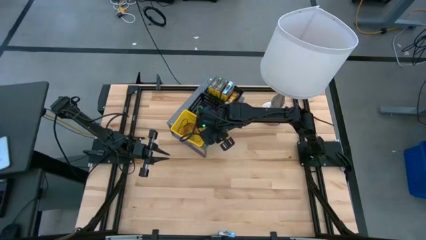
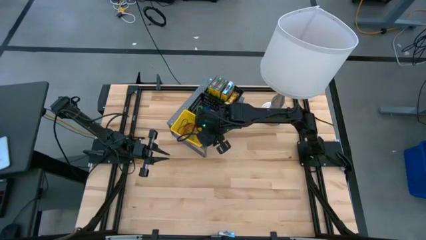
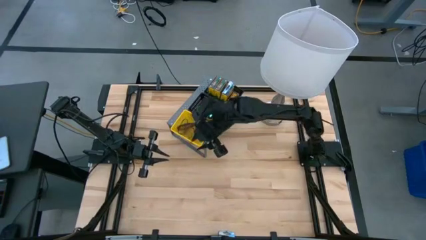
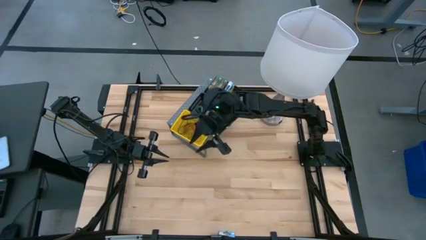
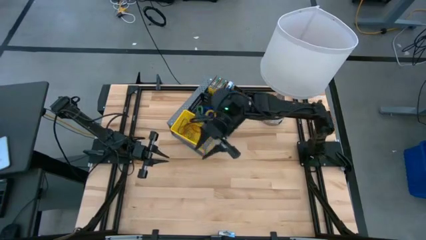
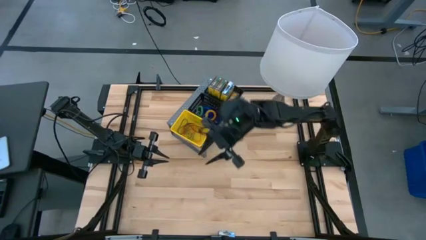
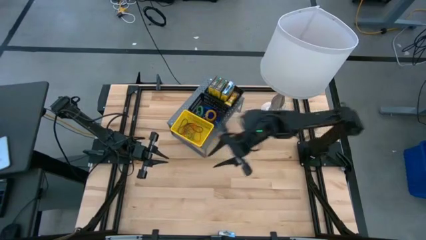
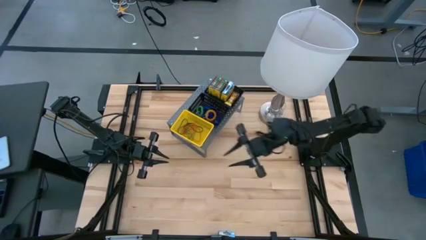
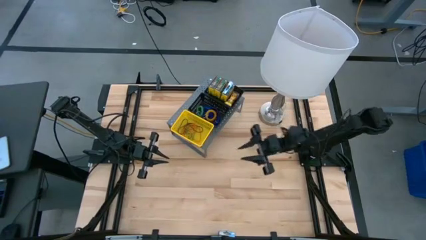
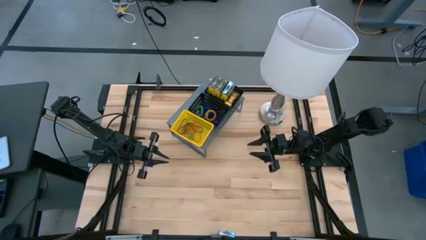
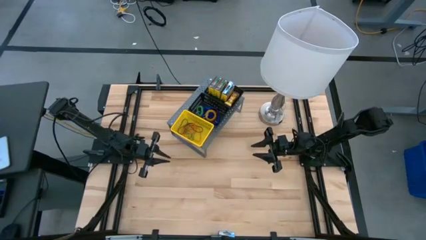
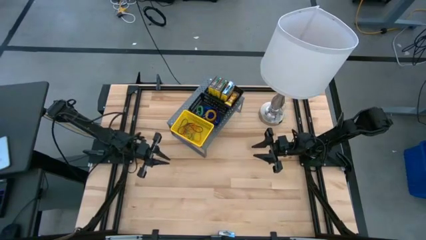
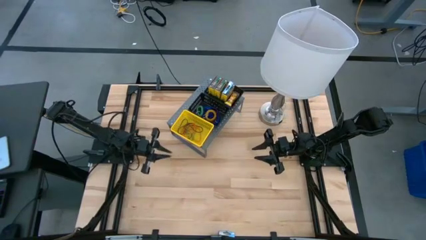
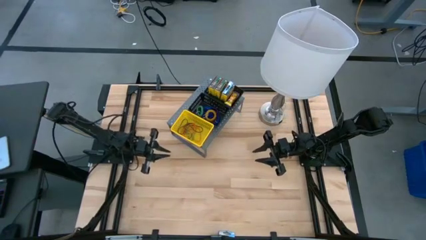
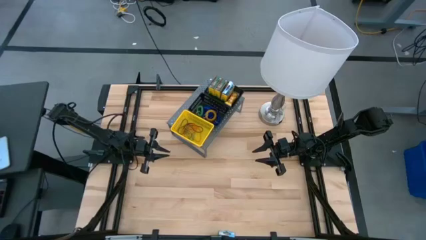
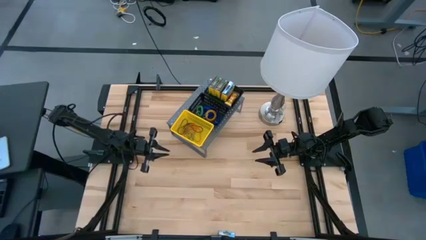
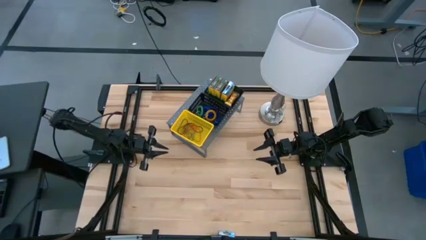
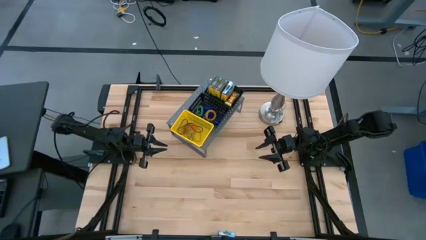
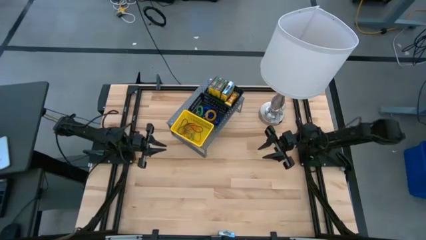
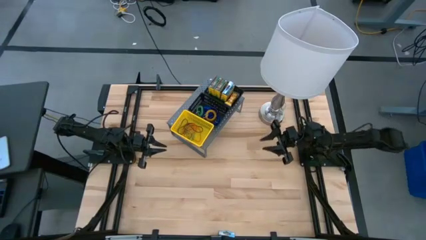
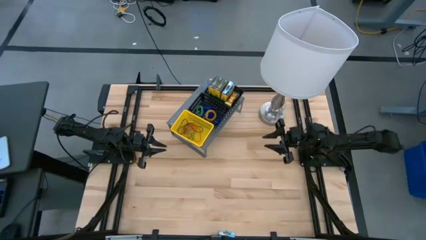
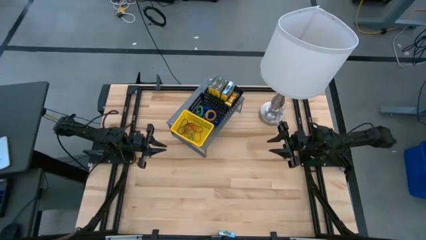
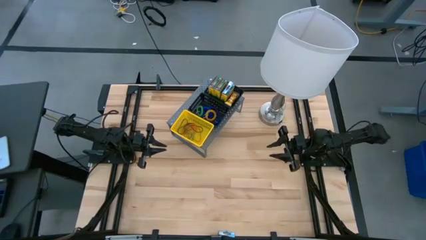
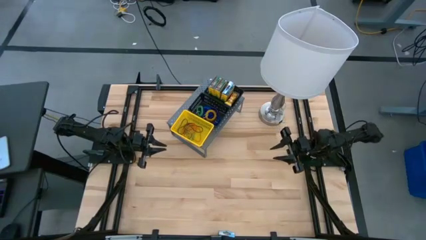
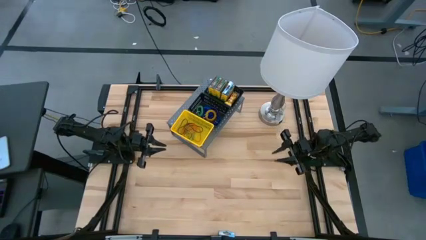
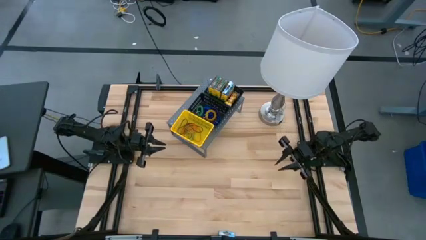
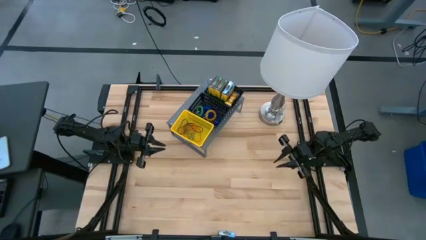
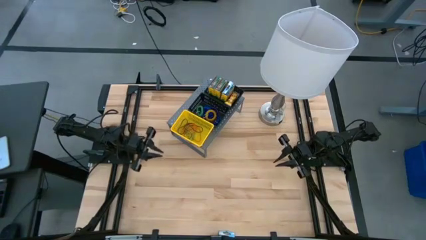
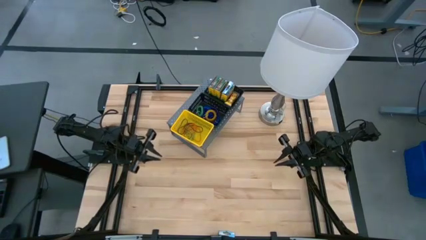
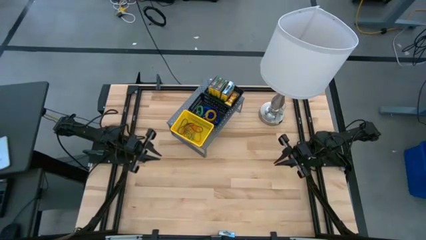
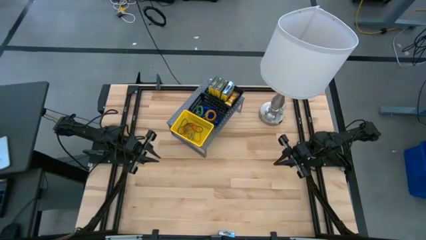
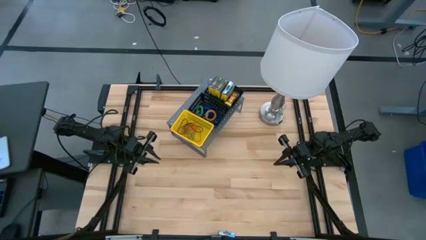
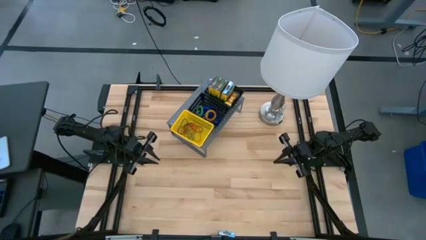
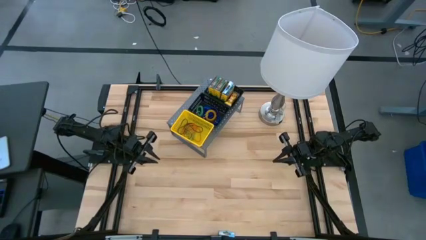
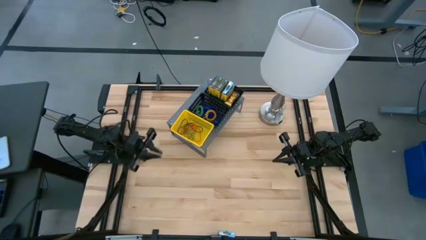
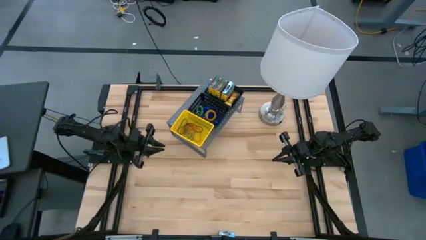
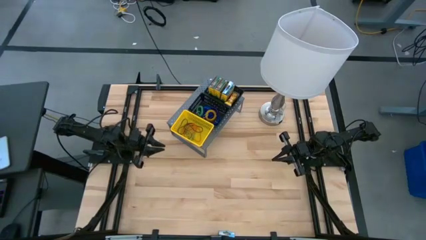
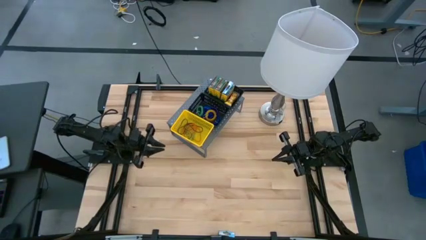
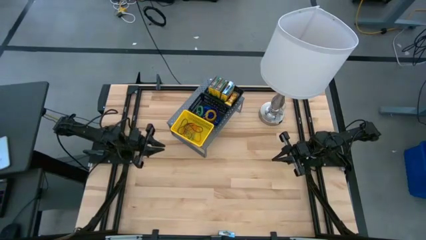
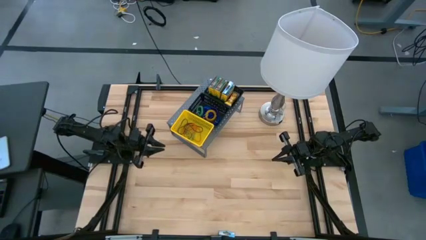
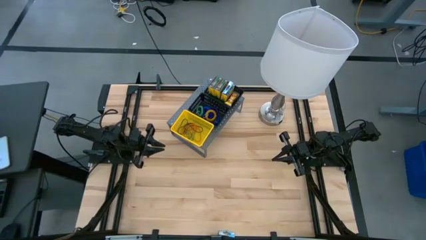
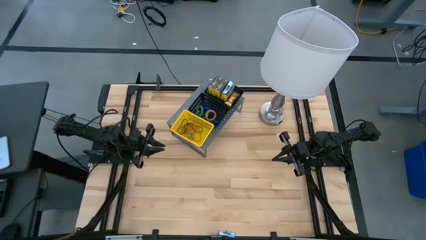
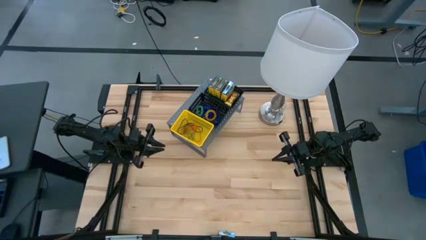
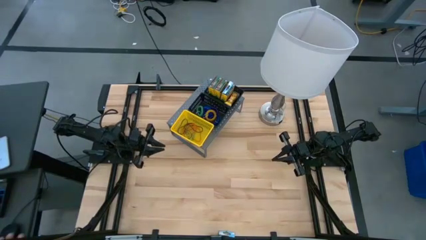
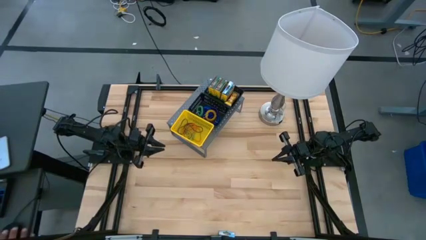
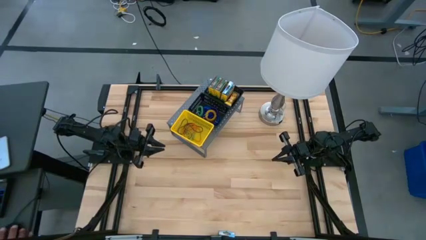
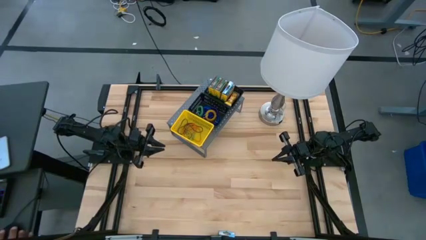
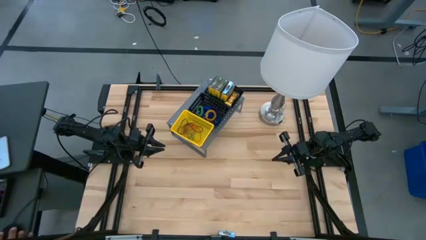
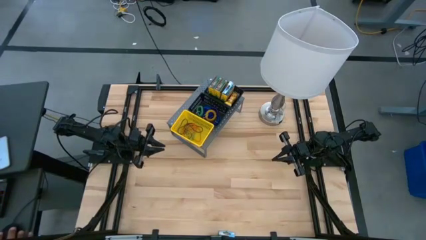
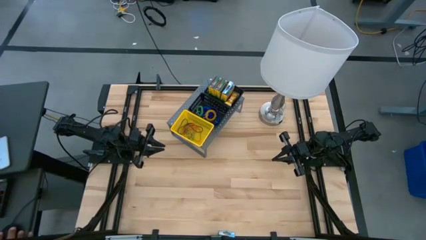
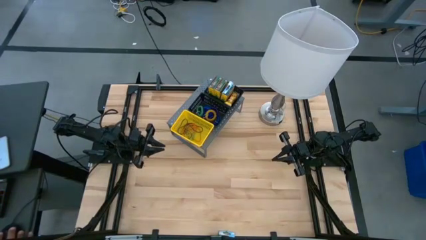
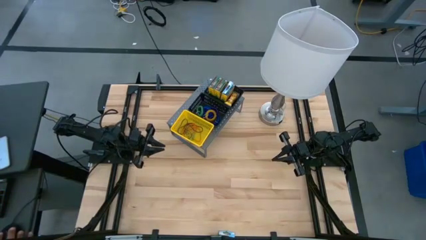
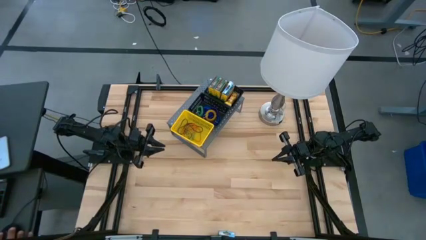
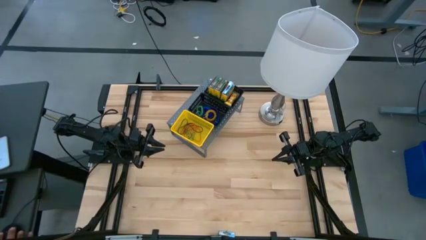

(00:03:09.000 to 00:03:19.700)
Task: Pick & Place Office Desk Supplies
Return to Home Position

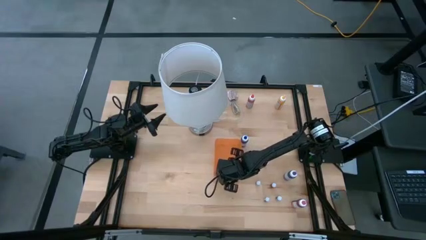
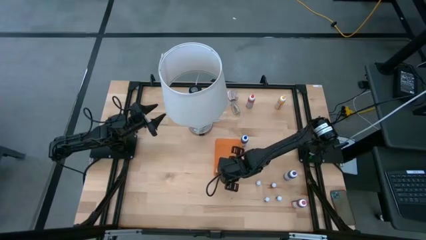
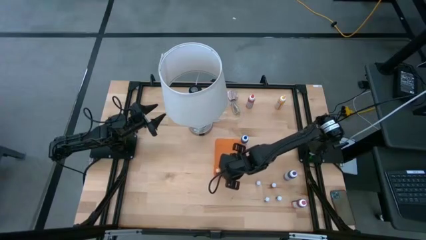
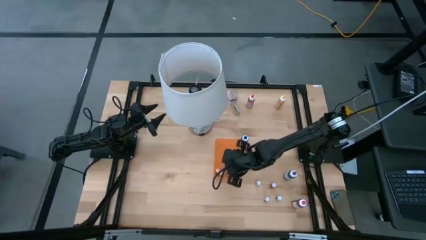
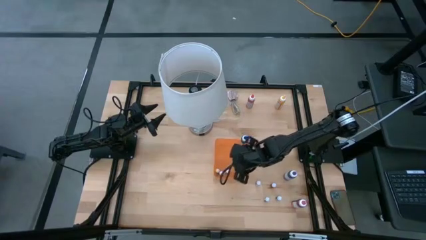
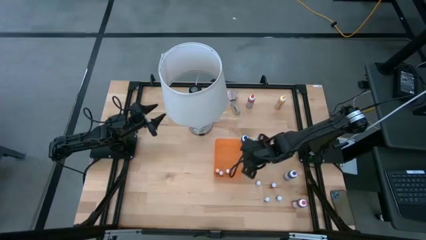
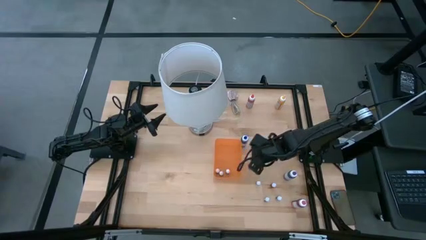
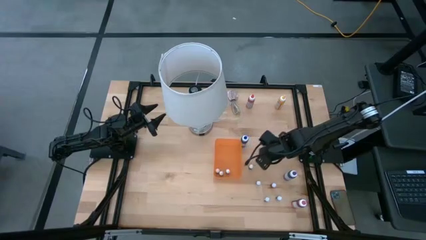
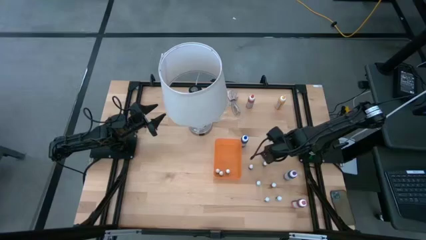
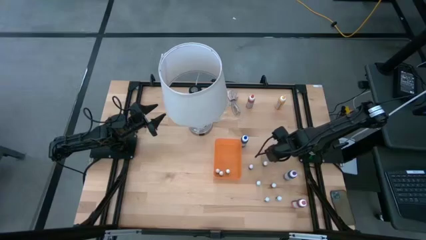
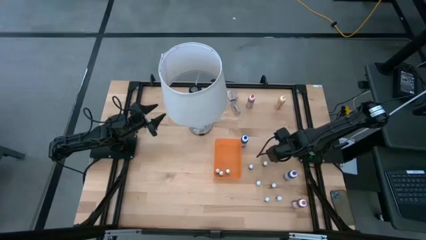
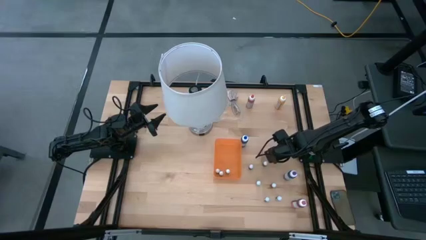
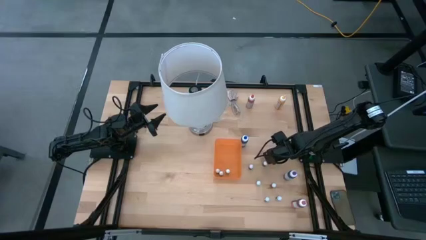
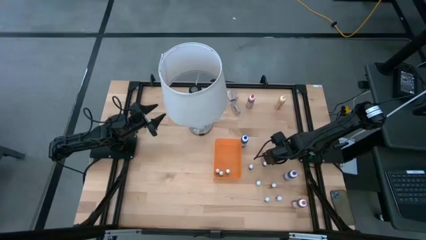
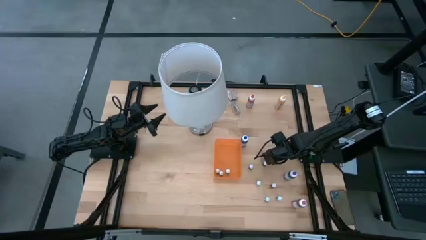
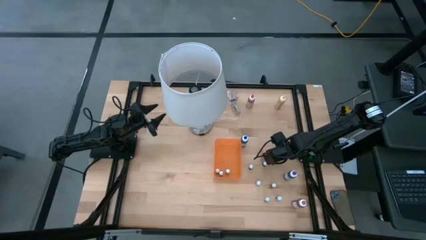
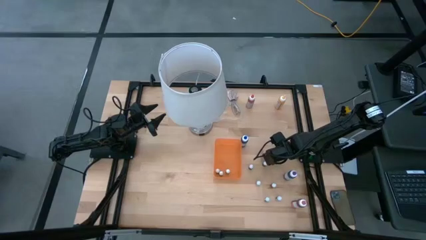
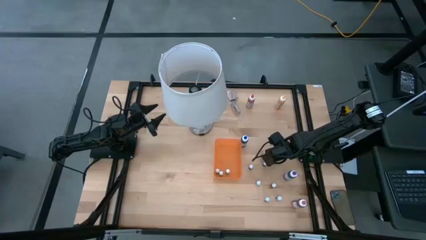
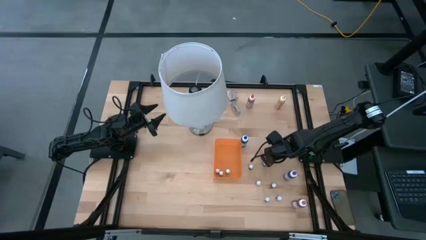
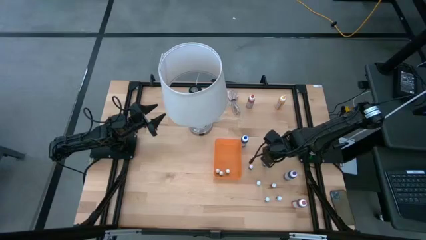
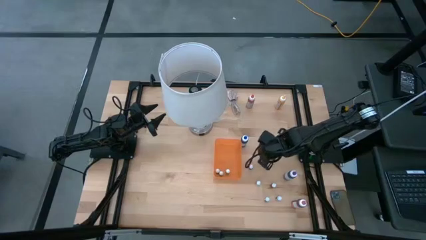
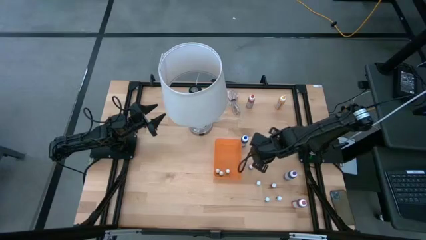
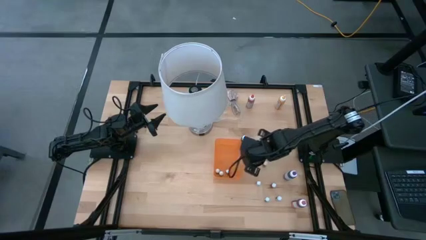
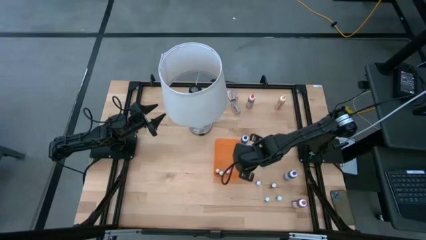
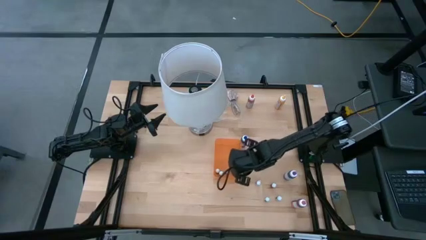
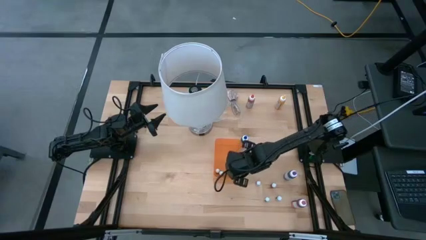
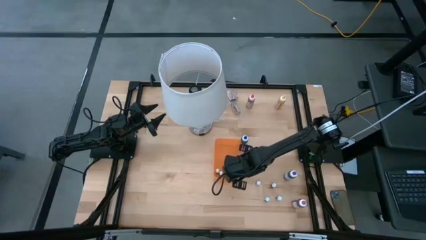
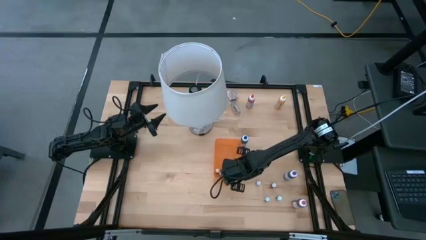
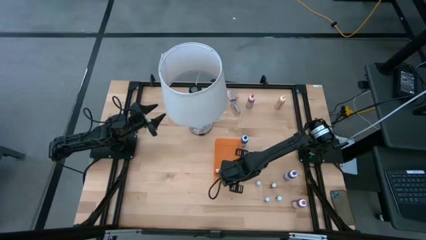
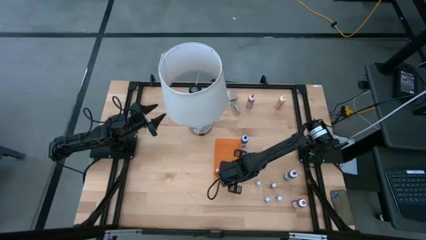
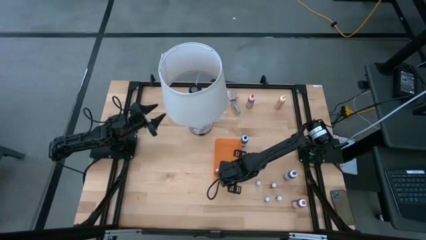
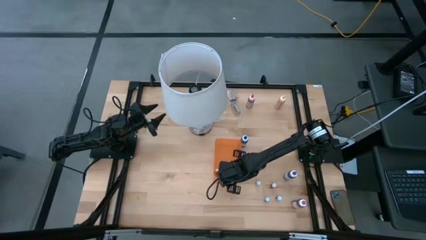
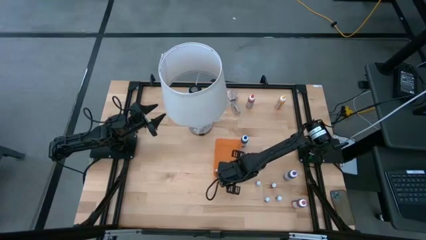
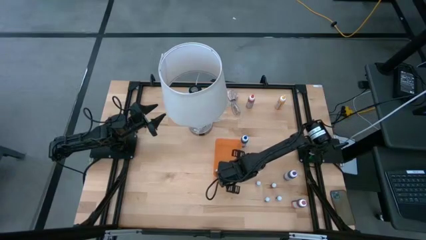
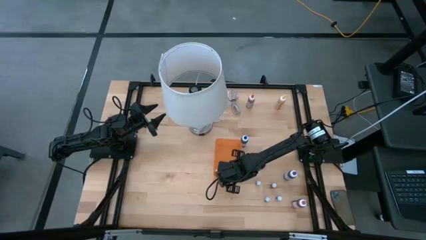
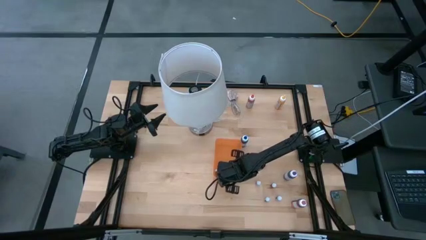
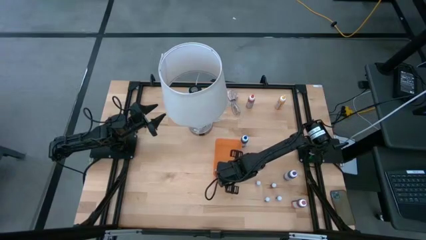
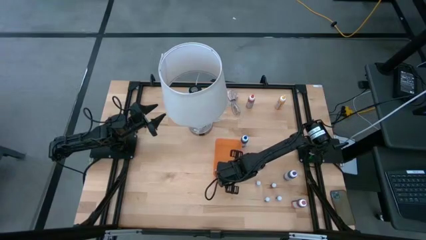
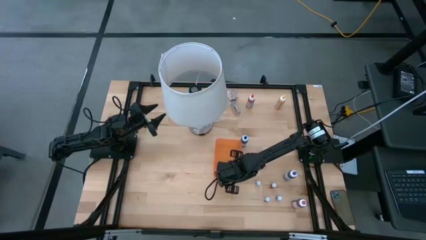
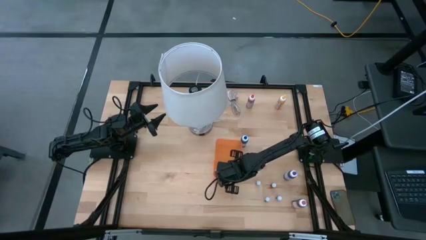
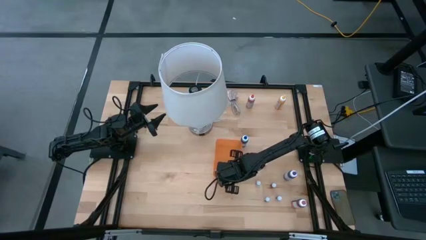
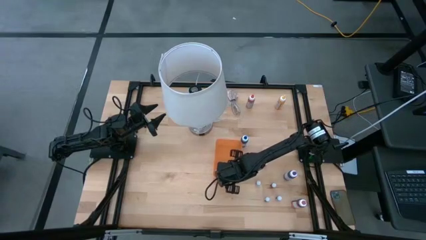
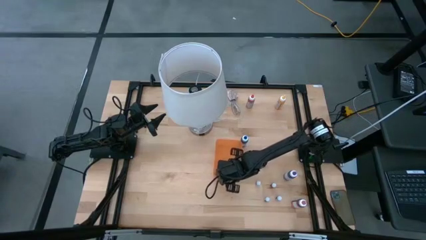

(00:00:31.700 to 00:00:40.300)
Task: Pick & Place food coloring
Put the small purple food coloring bottle into the orange bin
